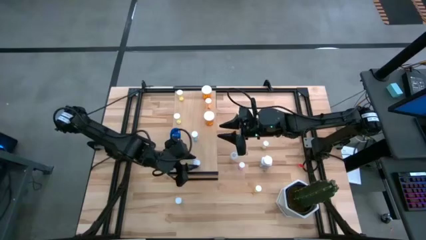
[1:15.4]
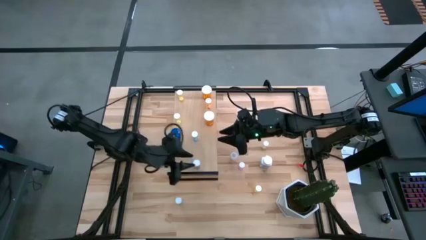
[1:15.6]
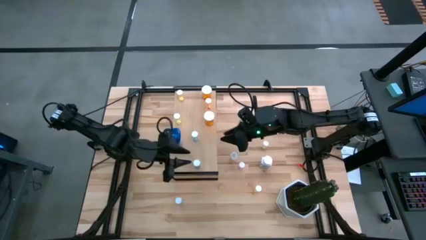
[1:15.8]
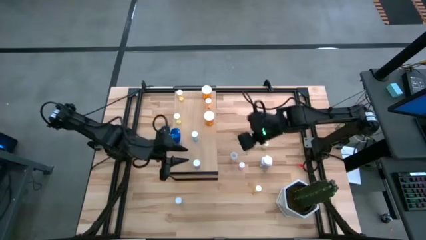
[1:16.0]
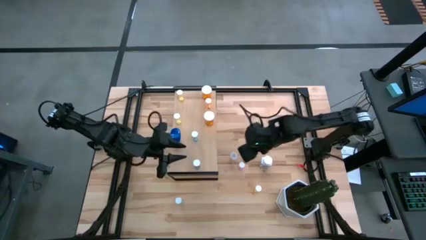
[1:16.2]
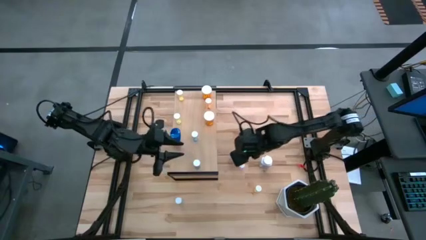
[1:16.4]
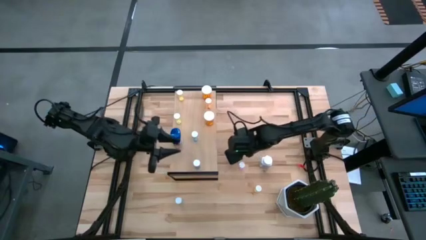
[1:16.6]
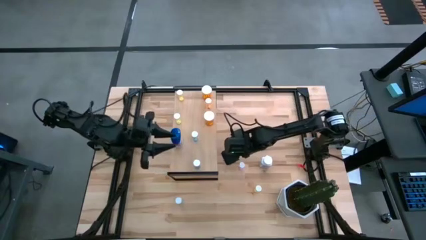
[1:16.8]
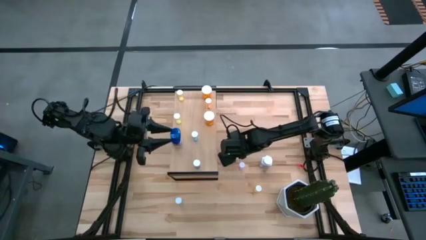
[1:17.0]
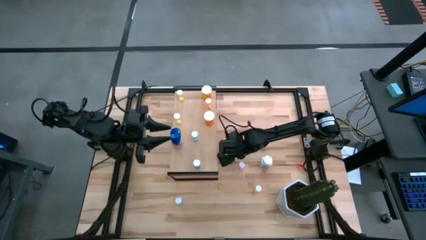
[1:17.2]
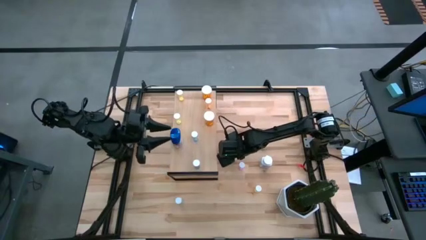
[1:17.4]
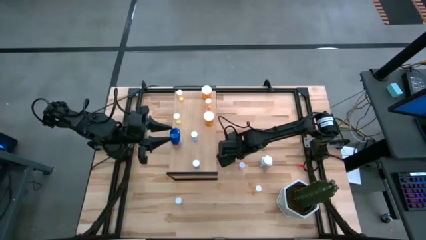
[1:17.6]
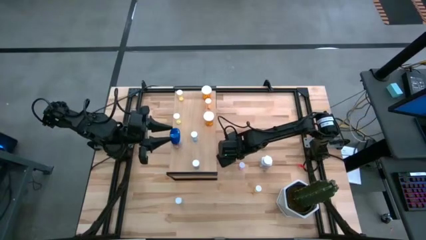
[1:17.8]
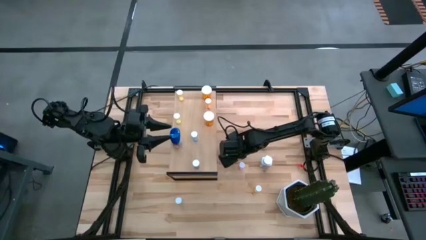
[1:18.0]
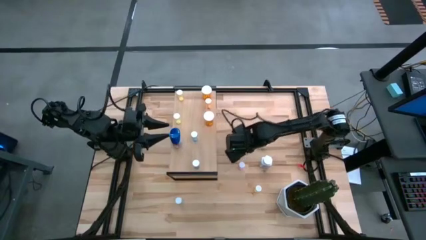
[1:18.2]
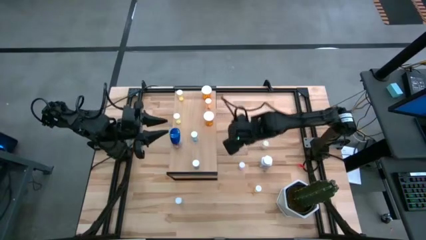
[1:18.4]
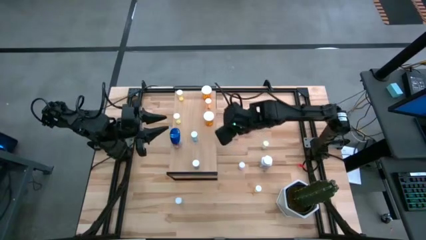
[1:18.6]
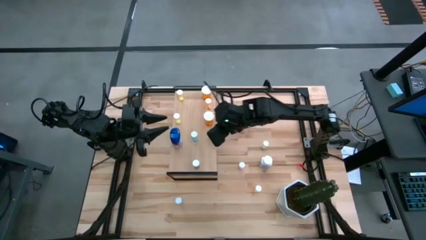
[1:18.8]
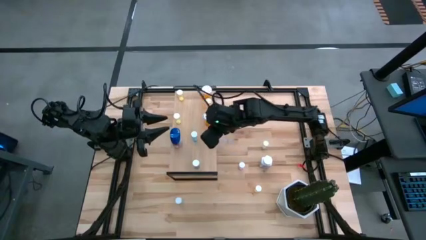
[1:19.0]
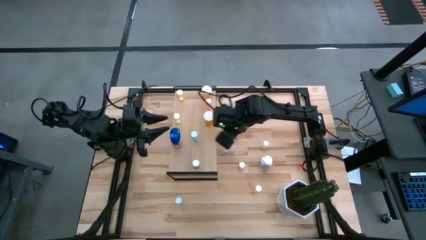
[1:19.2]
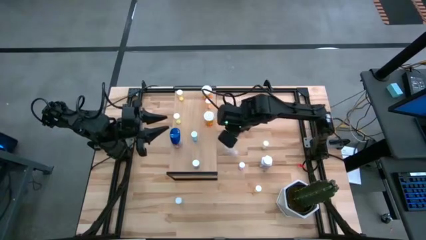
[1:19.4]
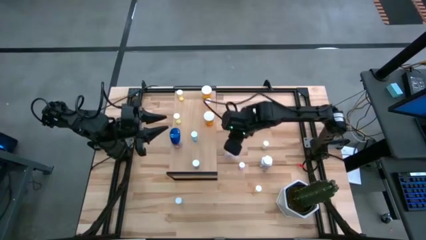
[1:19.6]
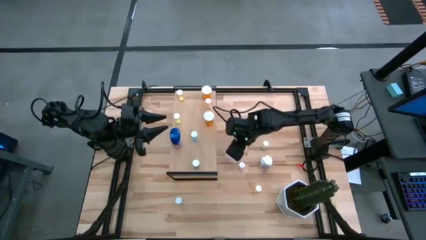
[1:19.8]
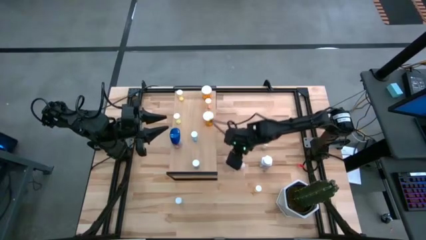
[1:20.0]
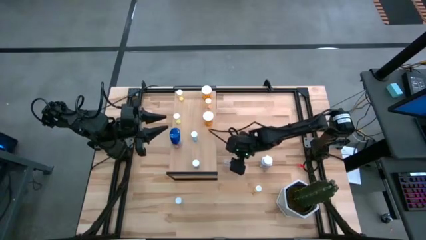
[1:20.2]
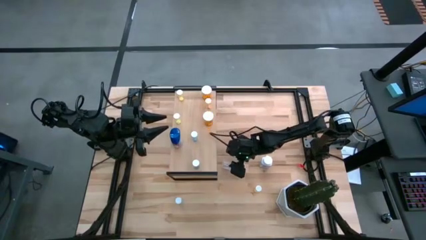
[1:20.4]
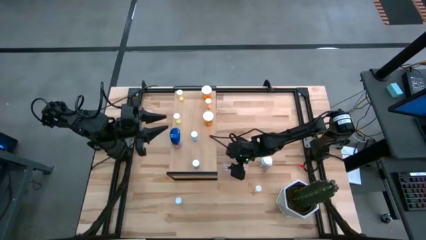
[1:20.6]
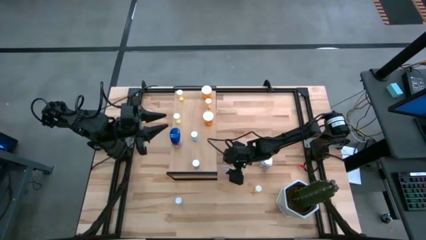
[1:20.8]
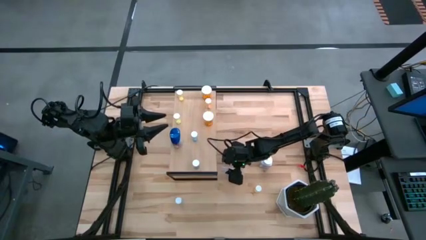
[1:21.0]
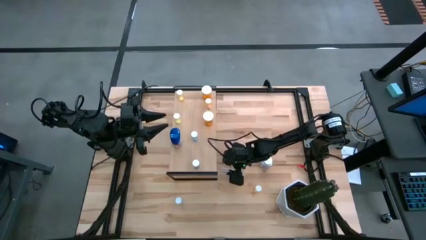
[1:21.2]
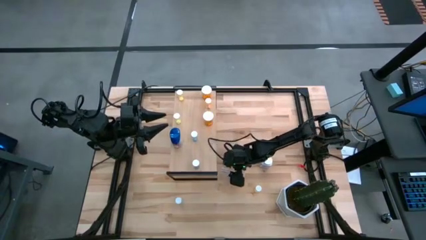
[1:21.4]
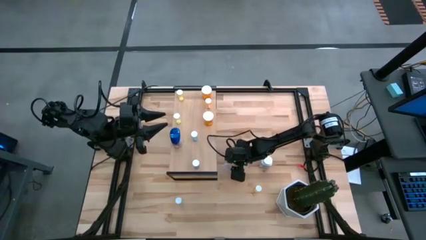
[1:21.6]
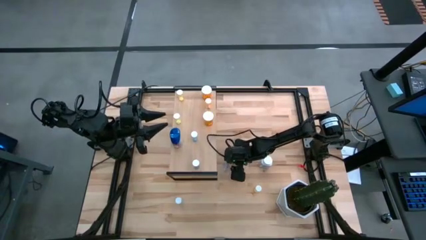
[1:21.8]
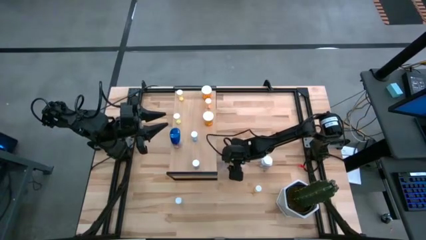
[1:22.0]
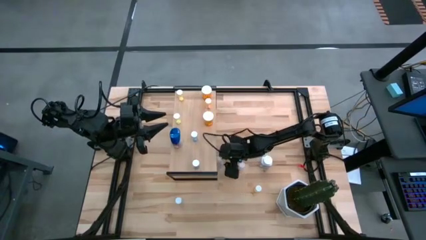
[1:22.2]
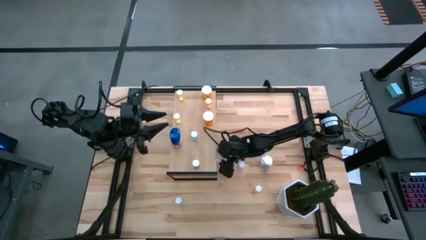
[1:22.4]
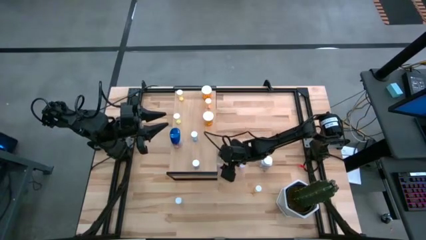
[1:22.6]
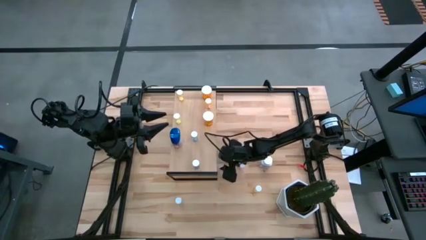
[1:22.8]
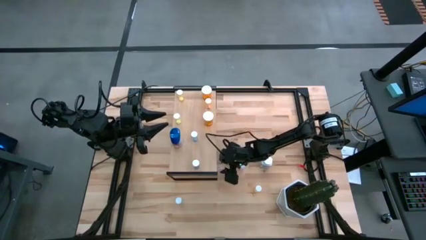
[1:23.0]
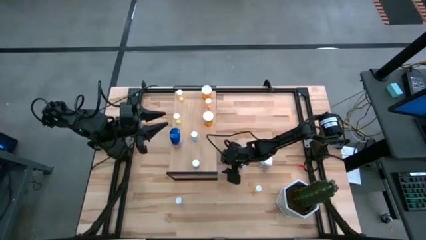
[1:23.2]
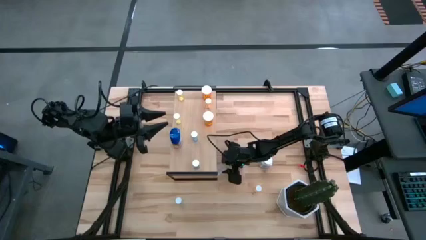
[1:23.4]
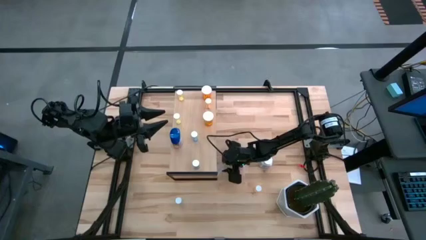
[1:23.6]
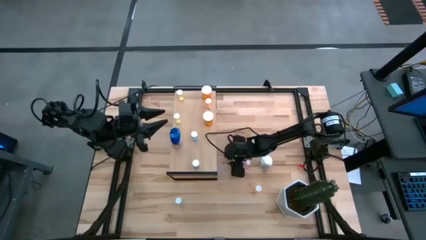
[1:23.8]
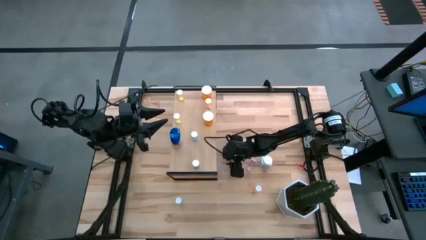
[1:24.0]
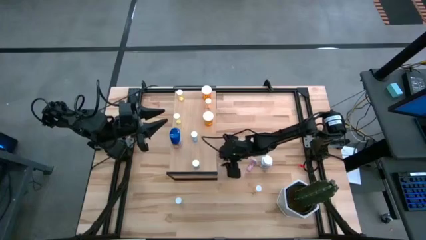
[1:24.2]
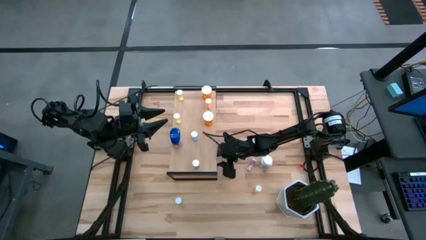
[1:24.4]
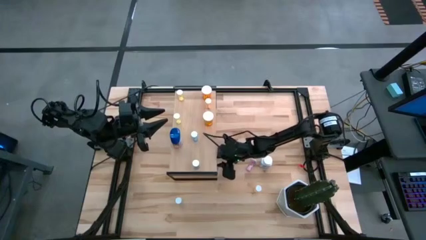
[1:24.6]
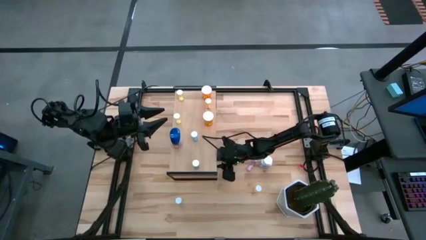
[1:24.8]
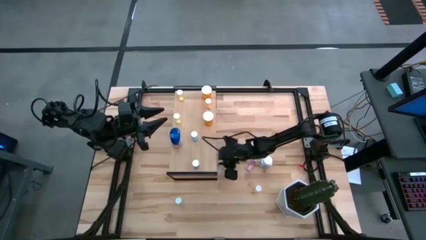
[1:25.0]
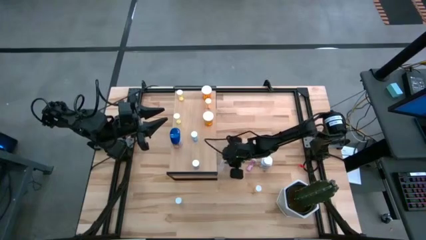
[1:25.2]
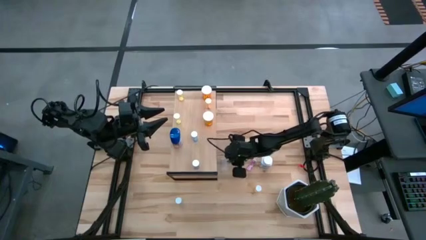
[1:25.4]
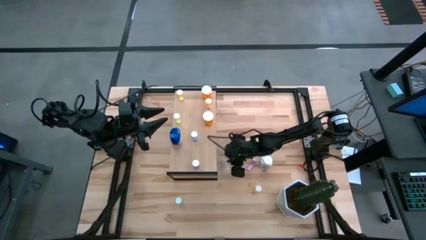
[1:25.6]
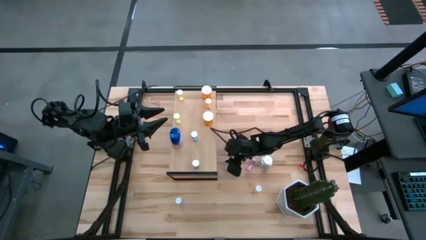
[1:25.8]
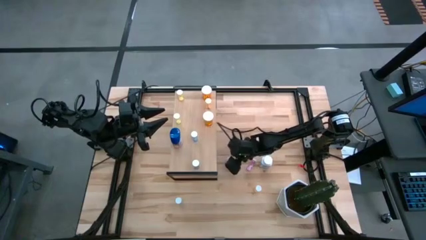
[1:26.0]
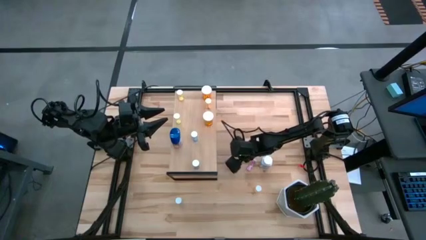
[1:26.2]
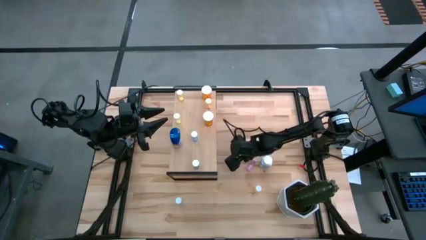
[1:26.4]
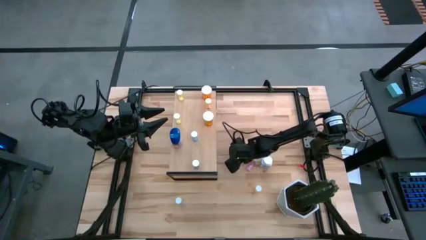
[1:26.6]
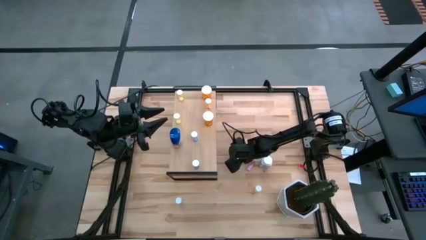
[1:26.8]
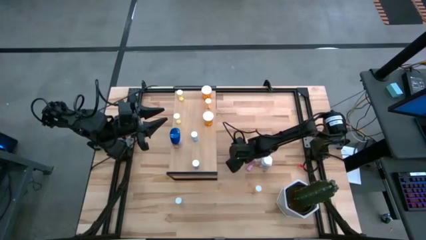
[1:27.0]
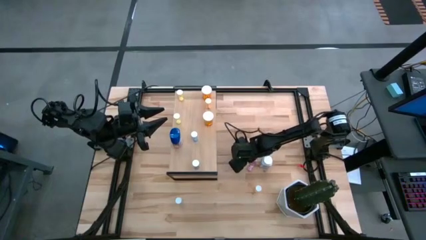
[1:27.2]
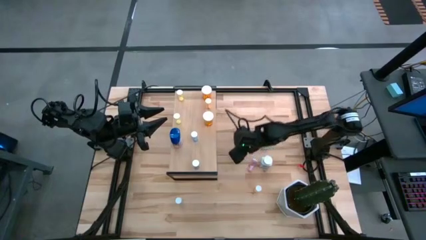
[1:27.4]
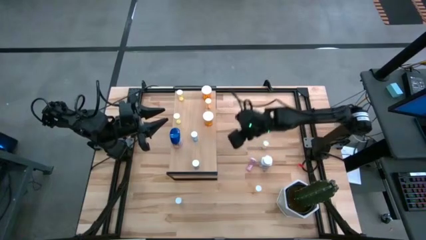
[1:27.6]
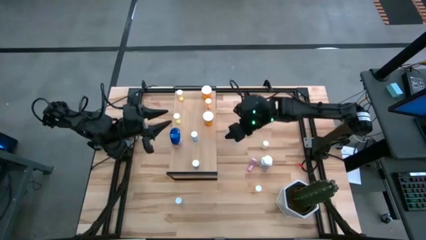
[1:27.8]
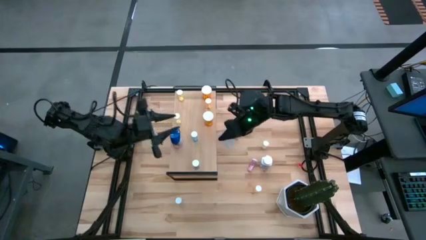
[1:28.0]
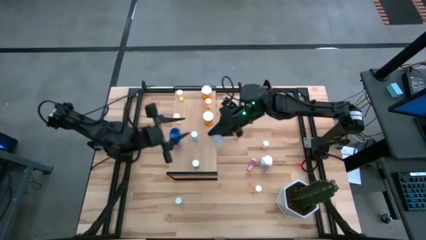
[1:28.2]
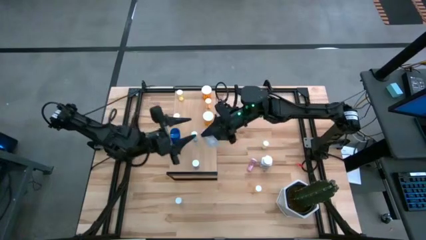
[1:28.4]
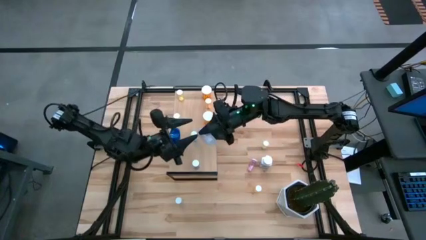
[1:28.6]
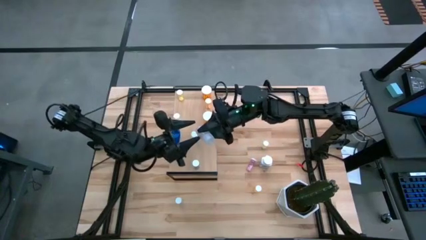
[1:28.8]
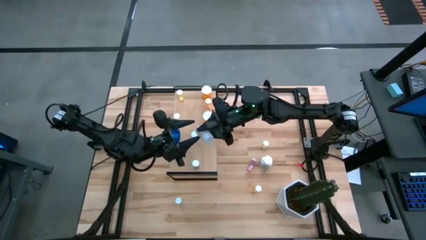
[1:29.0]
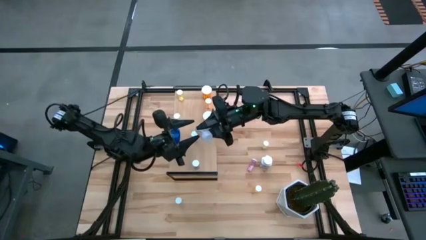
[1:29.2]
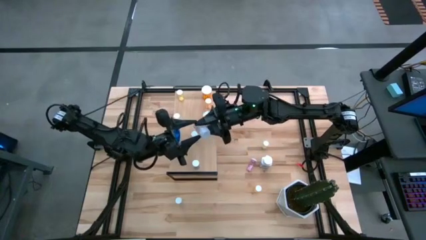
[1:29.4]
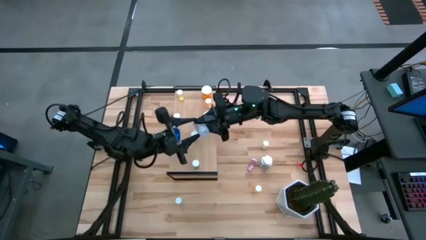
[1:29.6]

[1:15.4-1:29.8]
Task: Pick and place medicine bottles onto shelf by color
Put the middle transparent pill bottle on the shelf

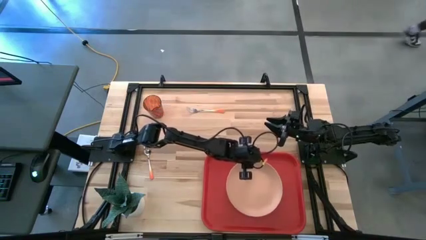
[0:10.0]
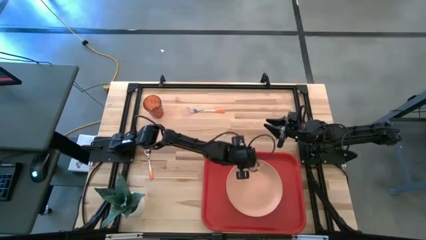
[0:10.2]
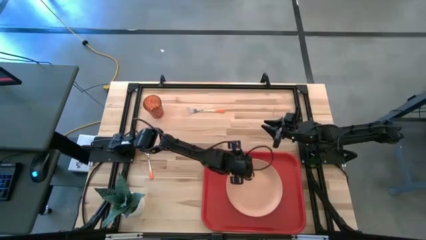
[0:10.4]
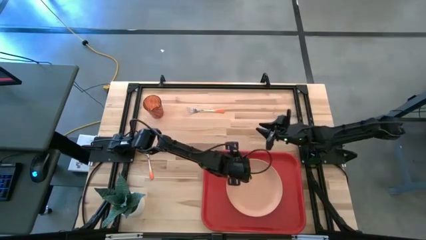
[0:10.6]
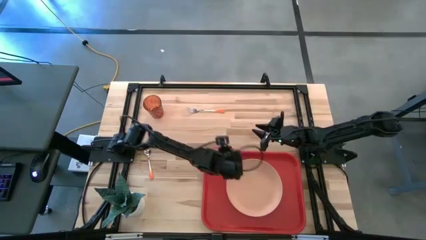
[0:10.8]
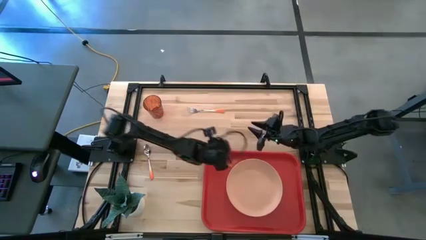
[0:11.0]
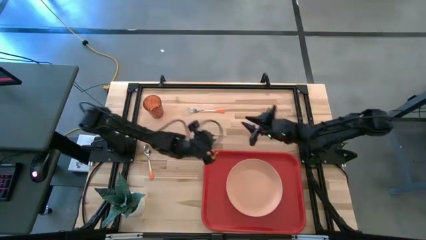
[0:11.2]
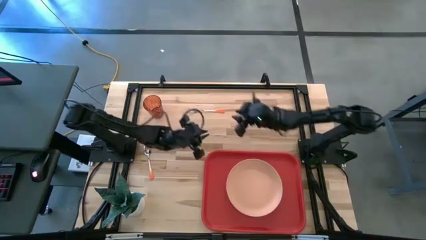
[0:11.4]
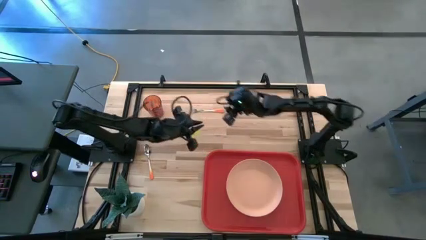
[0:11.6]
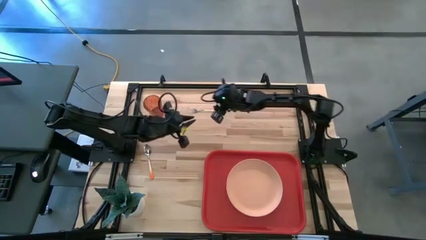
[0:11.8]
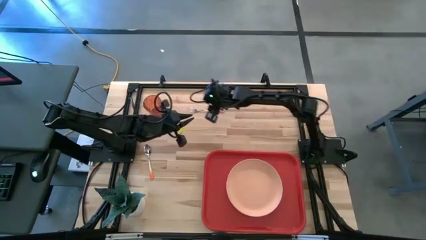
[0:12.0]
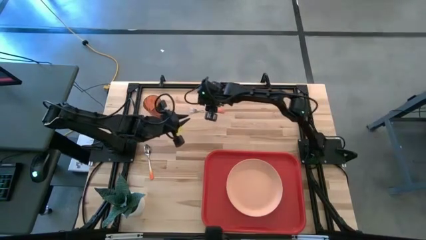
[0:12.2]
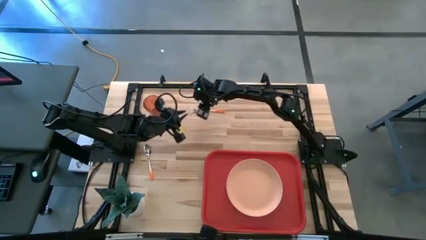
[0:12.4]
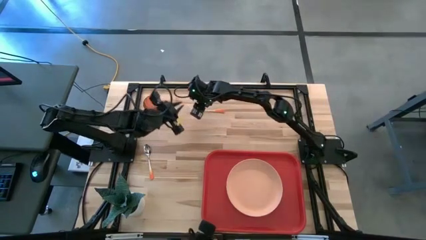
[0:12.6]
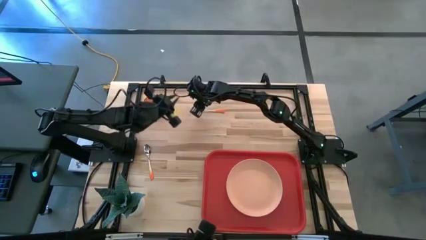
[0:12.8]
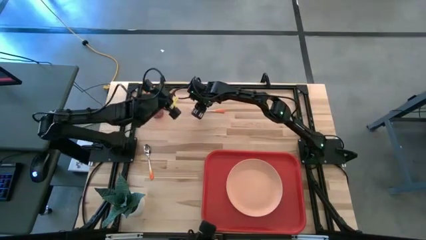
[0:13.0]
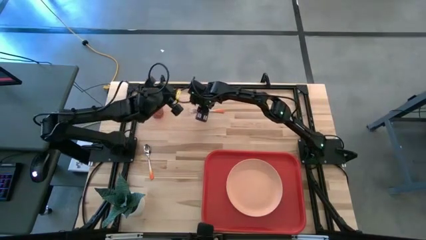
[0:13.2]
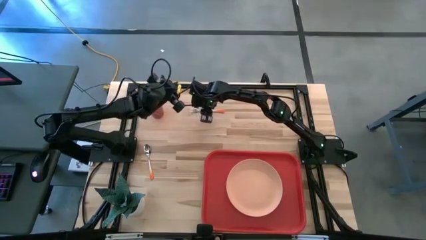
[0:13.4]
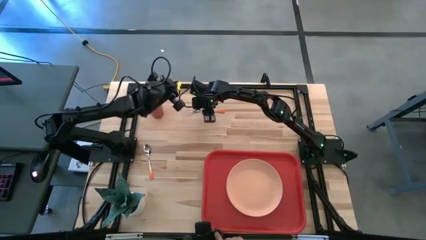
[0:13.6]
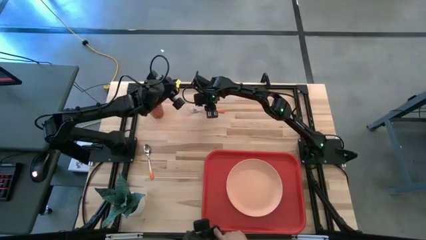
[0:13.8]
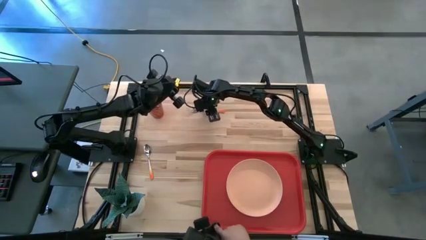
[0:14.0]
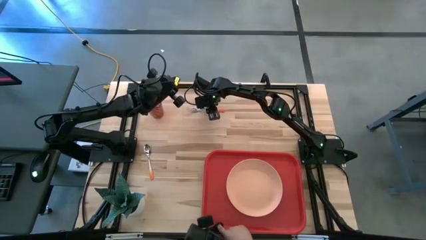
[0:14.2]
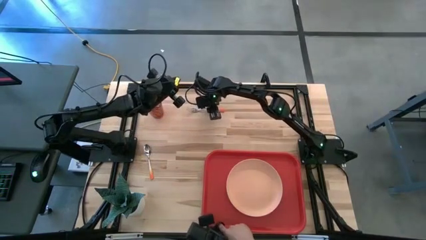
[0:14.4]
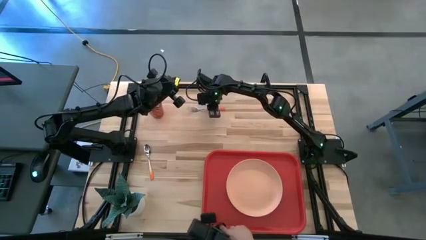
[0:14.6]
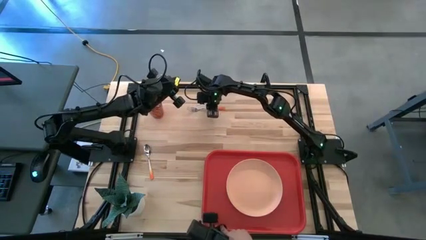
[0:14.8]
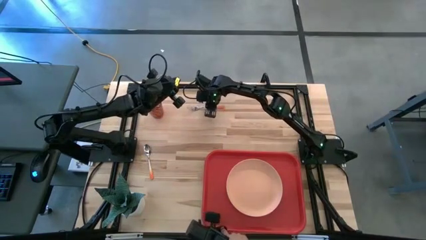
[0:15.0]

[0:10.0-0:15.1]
Task: Pick and place plate/cup/fork/spoon on tray
Put the orange fork on the orange serving tray to the right of the light orange plate
